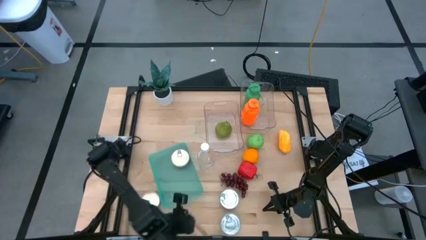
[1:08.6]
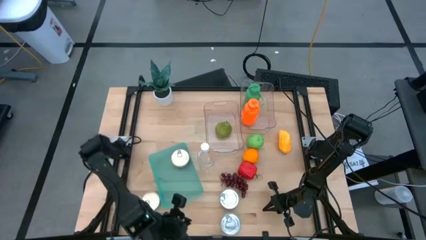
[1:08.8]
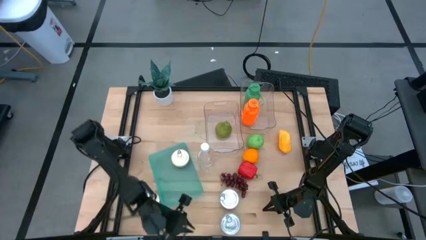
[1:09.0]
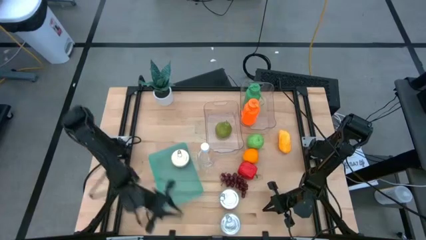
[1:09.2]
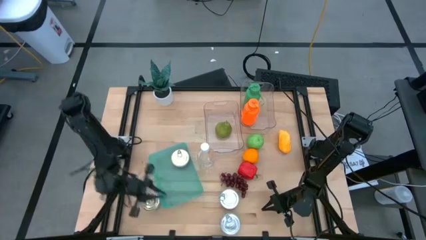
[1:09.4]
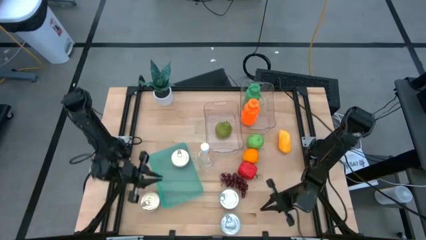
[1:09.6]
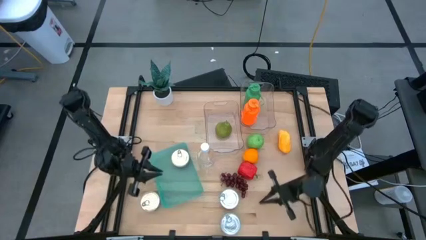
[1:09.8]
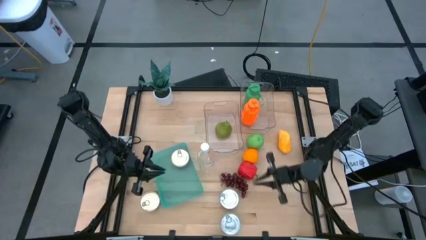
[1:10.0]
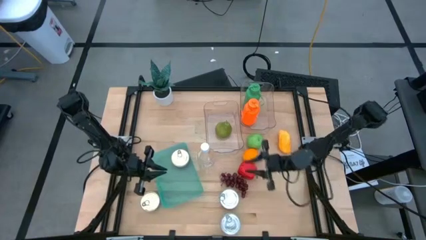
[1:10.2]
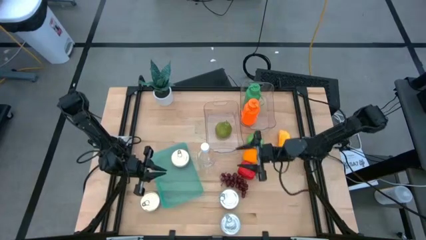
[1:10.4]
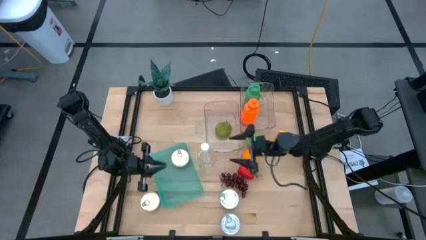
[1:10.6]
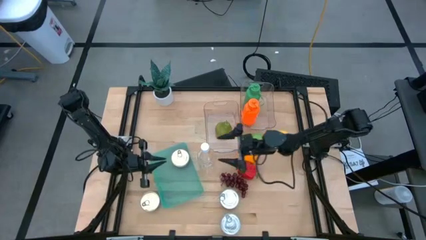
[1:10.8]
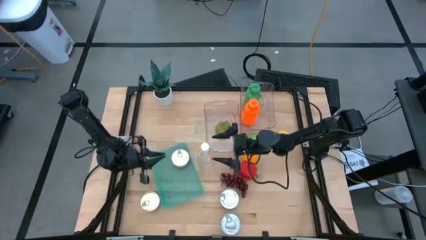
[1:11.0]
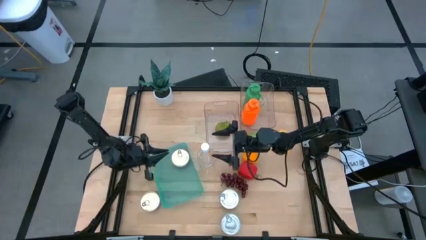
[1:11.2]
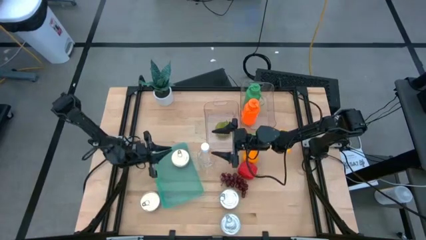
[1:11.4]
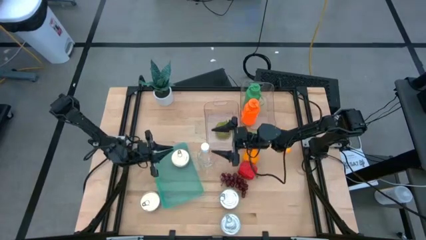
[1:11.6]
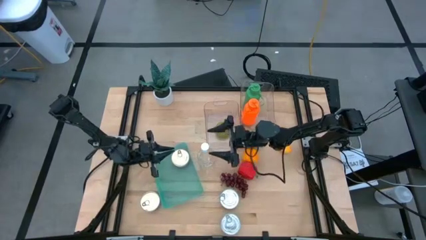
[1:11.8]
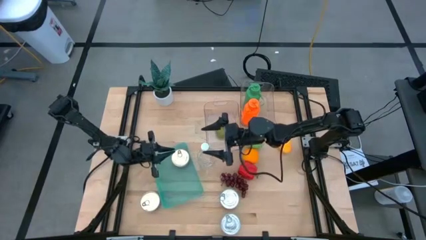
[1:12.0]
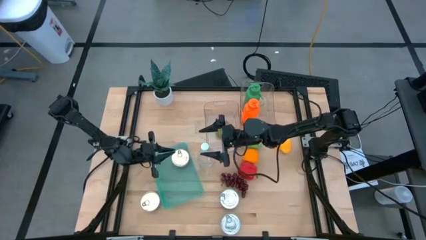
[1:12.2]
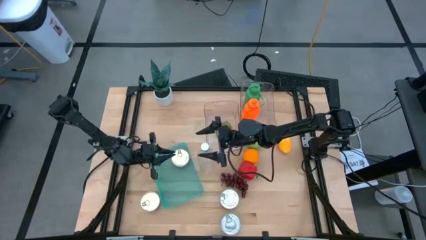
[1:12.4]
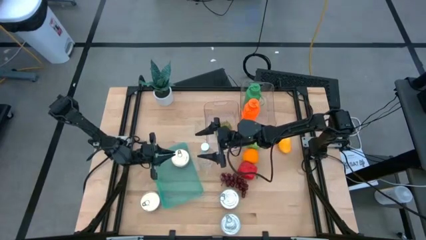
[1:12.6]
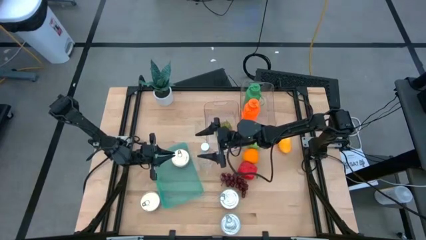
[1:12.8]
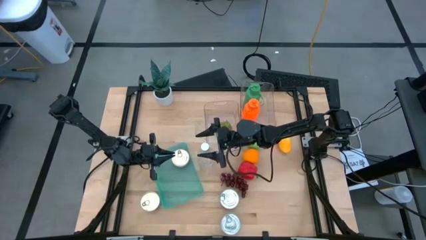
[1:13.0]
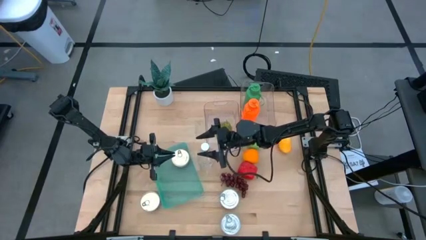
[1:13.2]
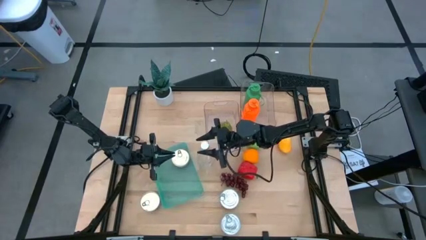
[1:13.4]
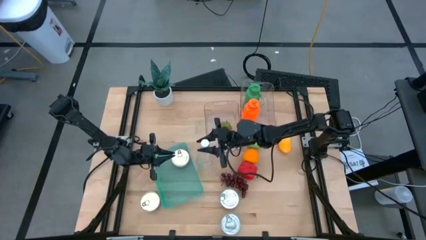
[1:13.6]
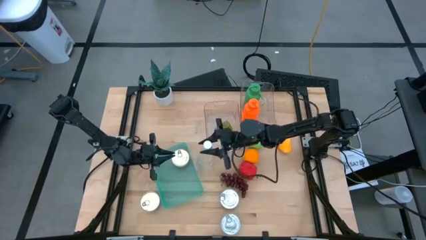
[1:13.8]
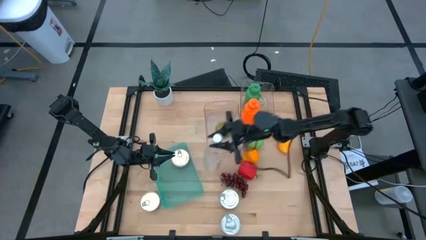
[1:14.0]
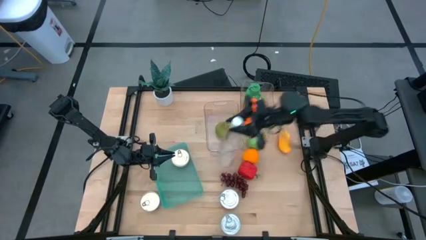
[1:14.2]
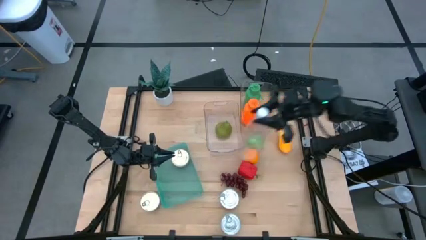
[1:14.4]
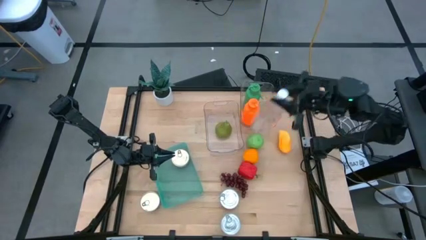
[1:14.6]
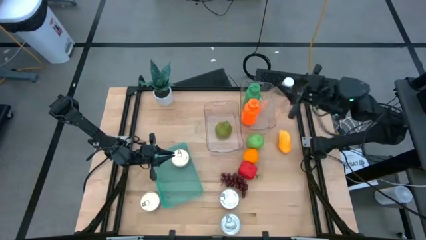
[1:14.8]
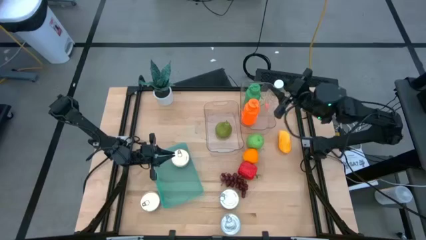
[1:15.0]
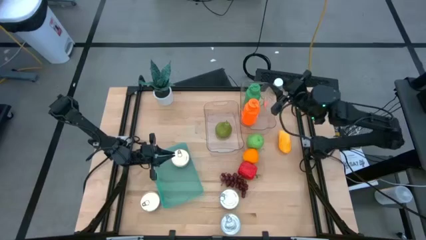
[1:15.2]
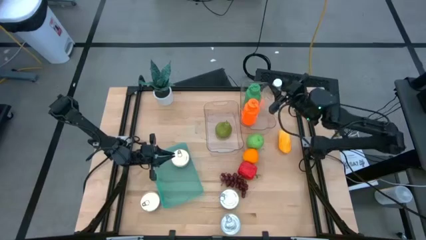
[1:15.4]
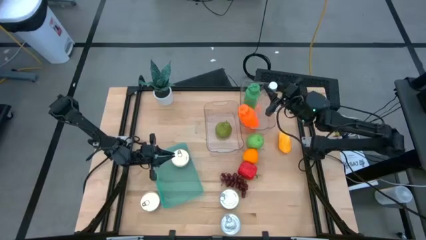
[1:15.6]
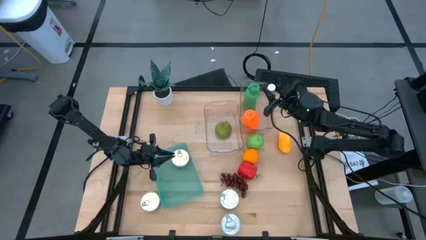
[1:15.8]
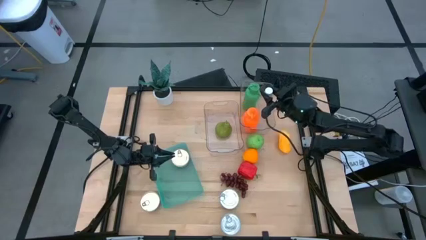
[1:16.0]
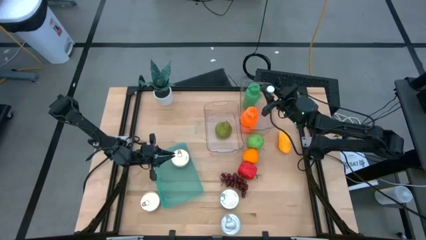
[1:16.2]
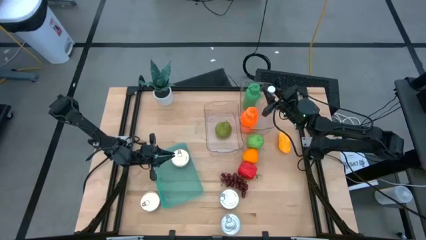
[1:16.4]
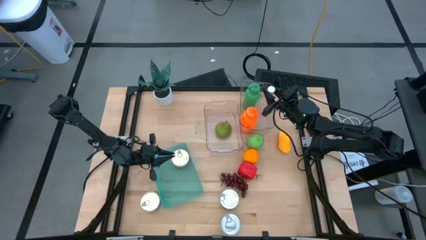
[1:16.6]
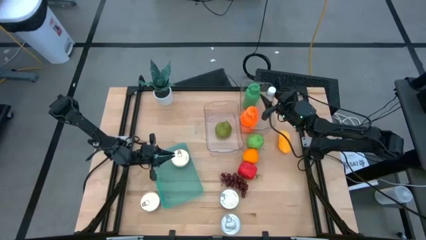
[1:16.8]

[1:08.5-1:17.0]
Task: Pick & Place Food Item
Put the transparent water bottle into the top transparent bin

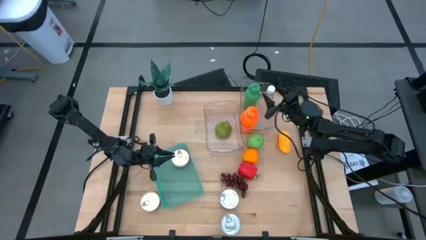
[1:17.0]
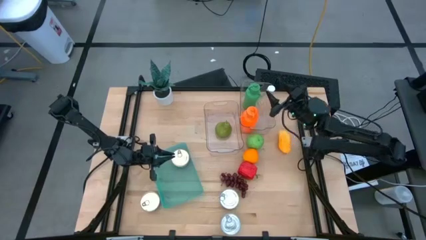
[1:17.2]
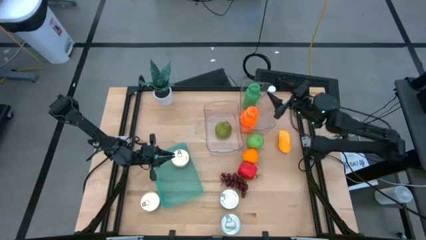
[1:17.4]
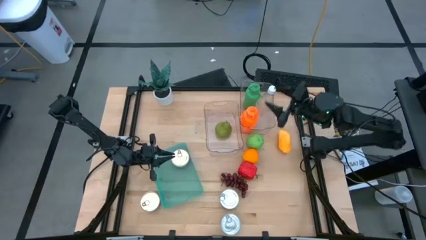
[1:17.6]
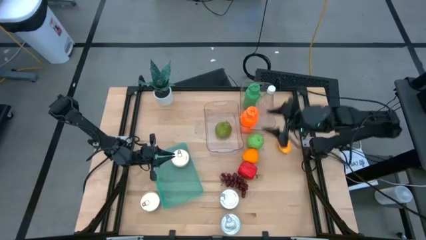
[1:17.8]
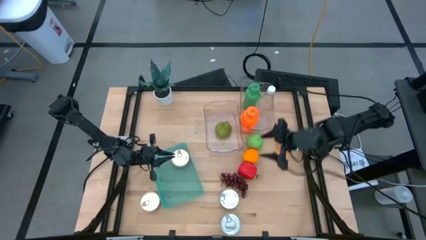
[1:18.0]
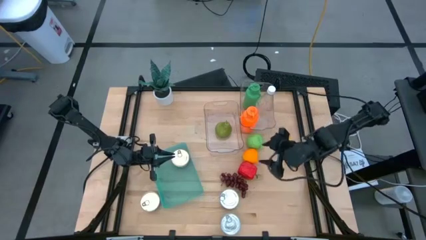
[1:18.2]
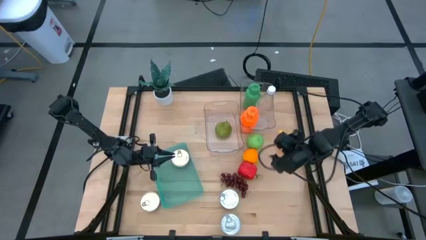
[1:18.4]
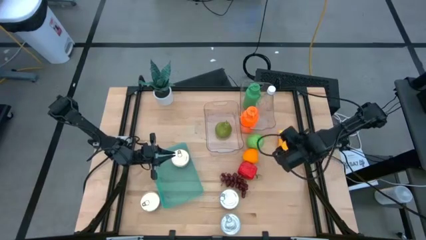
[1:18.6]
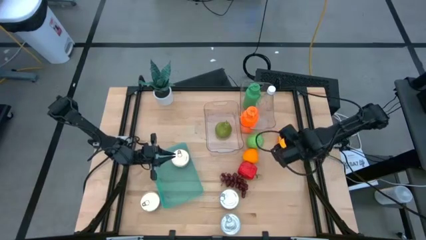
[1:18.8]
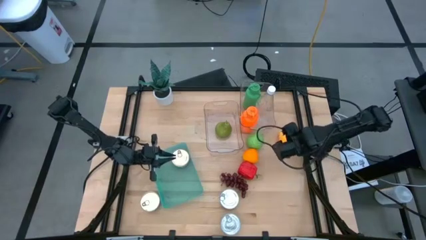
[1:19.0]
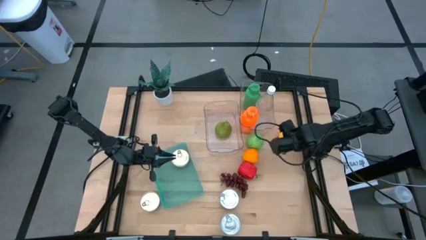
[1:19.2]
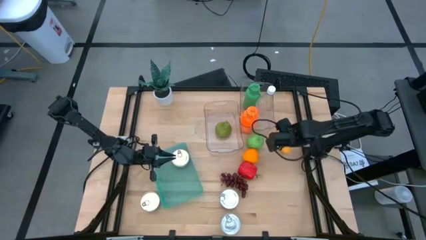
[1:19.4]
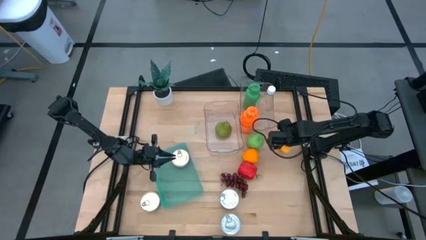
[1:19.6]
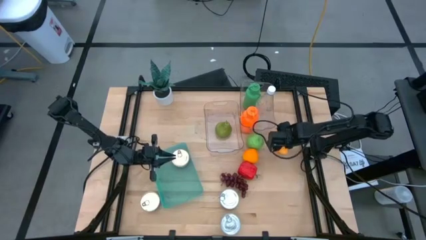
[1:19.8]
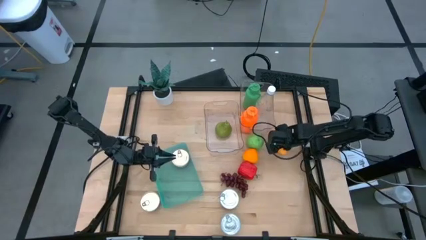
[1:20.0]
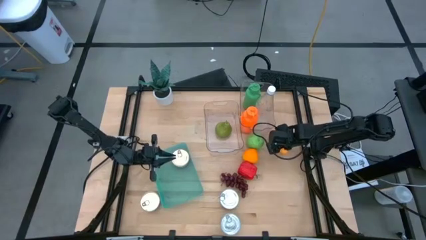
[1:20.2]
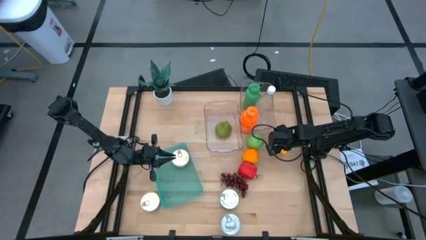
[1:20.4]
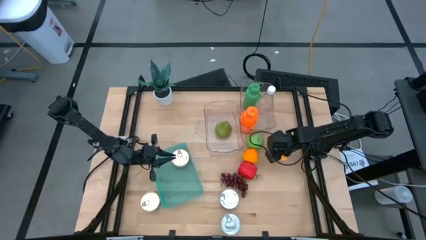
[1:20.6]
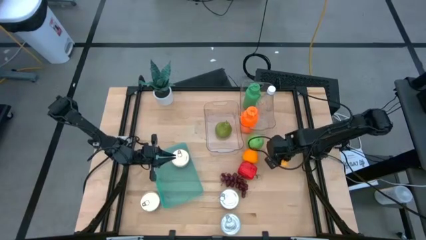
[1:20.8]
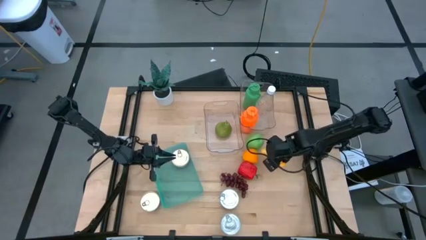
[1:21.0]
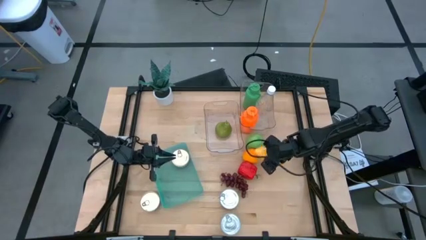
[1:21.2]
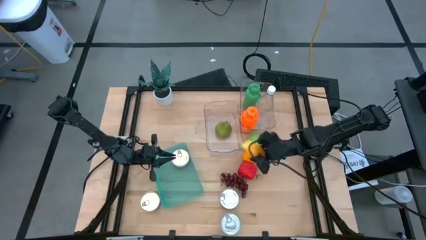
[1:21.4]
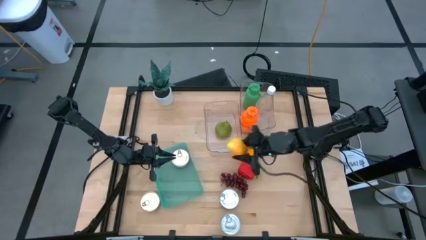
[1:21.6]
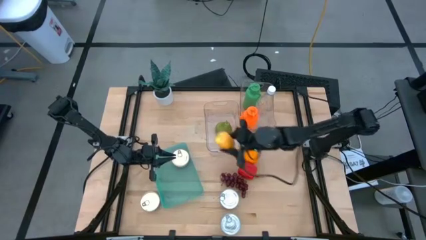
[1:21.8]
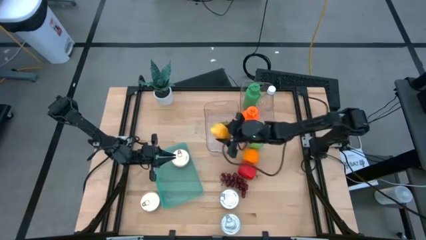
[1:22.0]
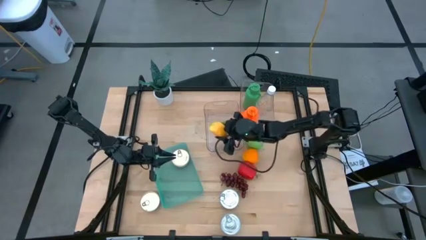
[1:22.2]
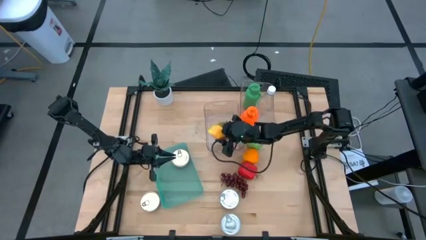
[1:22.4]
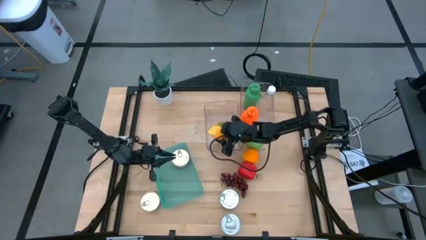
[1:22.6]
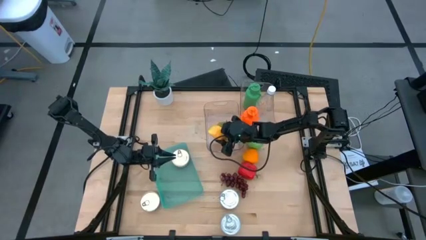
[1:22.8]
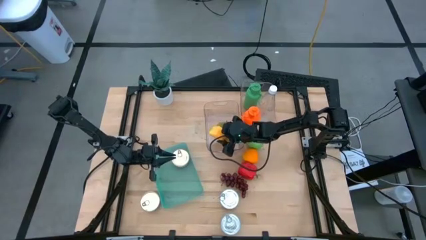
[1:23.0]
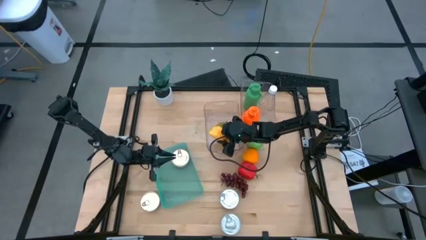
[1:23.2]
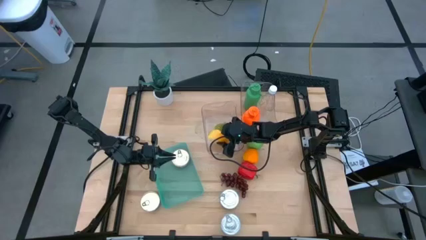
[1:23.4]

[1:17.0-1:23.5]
Put the yellow mango into the bottom transparent bin

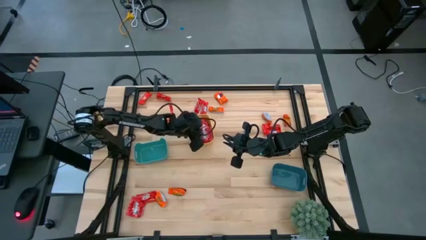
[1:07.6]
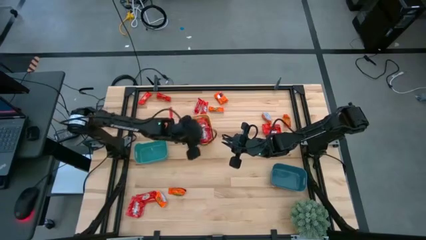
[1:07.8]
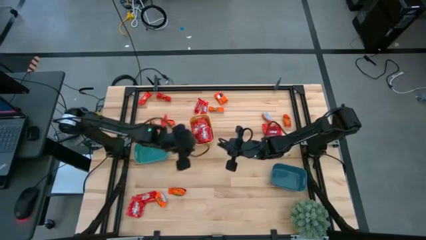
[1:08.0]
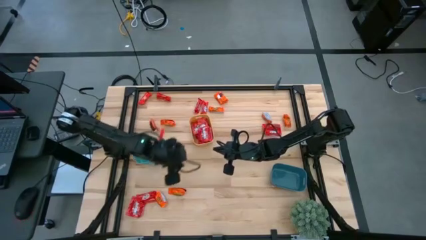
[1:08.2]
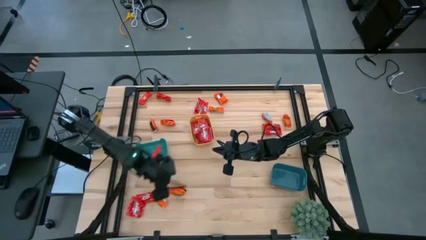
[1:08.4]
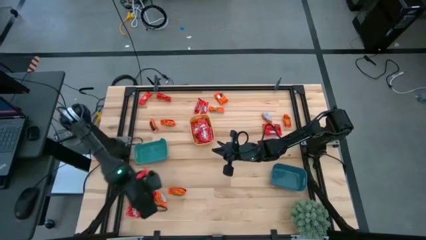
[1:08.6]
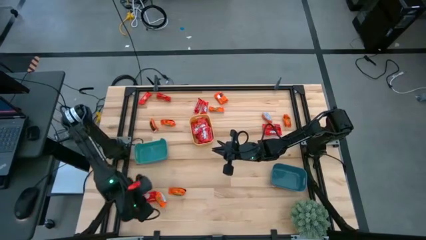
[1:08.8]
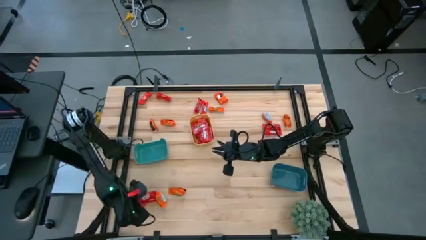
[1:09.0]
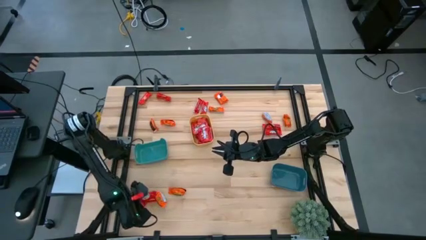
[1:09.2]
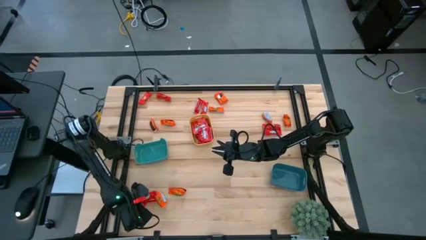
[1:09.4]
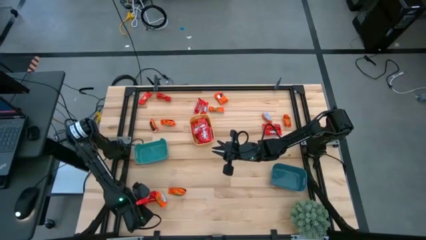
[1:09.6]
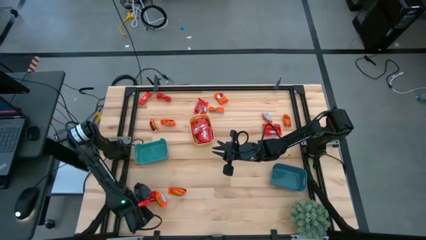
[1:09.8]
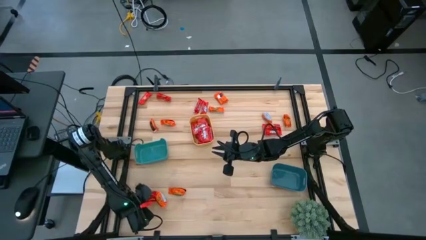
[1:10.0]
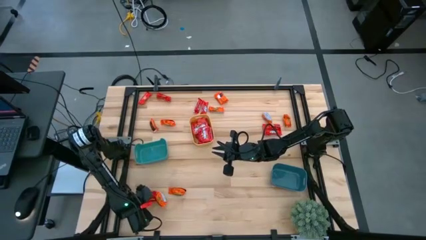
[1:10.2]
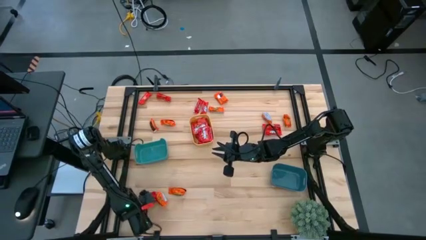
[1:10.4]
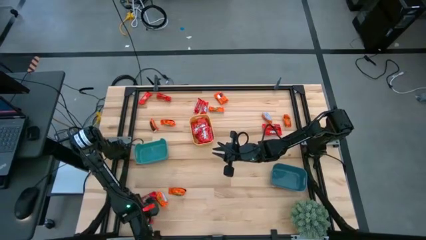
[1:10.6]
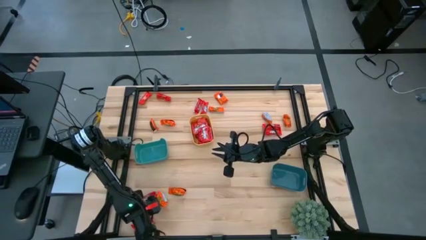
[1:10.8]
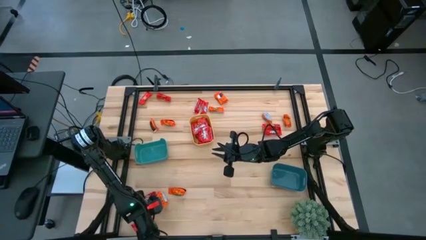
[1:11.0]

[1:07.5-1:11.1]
Task: Sort candy
Put the red candy into the yellow bin
